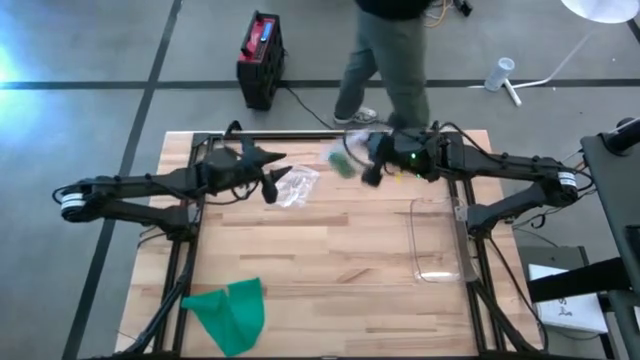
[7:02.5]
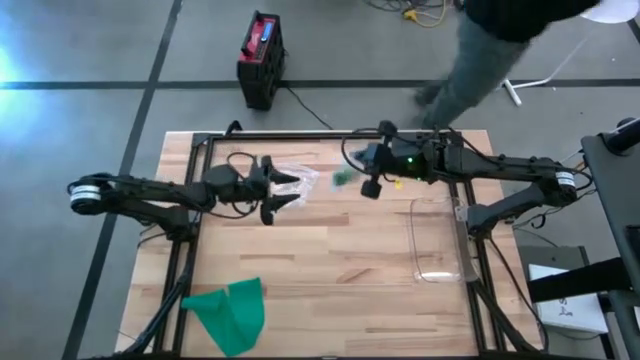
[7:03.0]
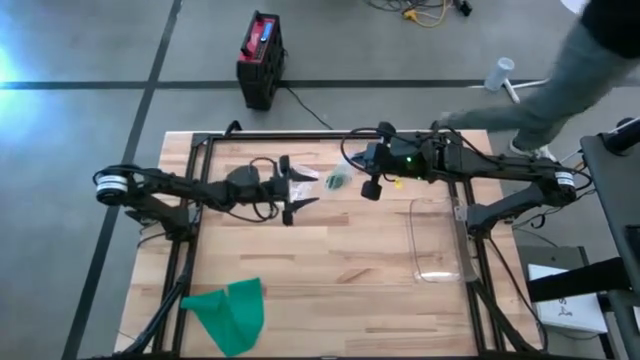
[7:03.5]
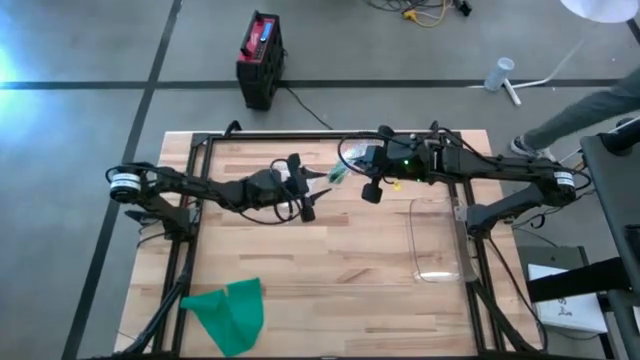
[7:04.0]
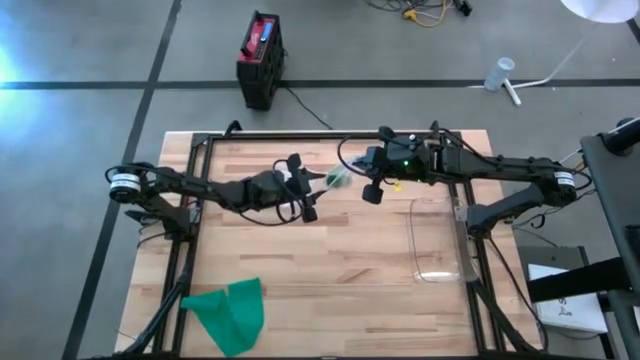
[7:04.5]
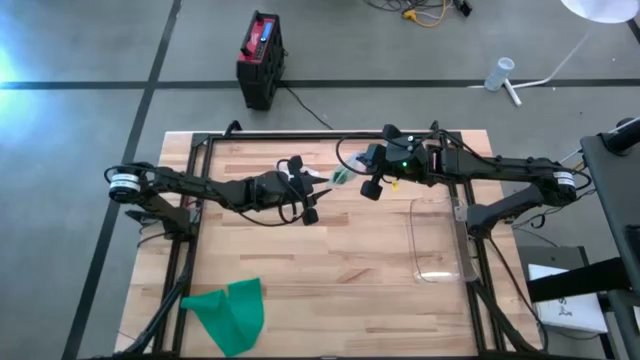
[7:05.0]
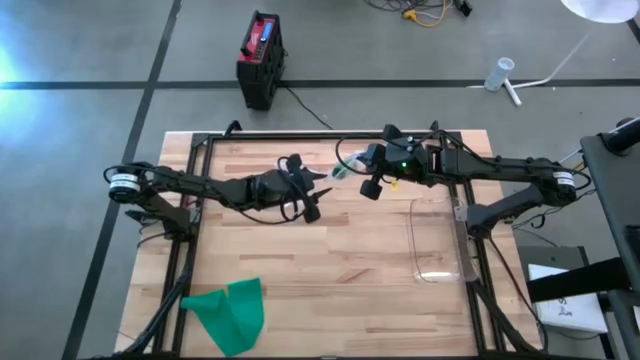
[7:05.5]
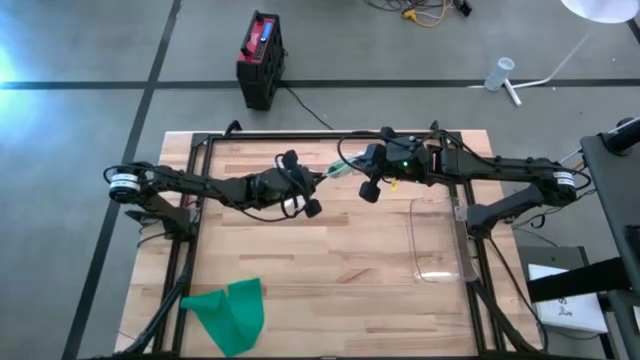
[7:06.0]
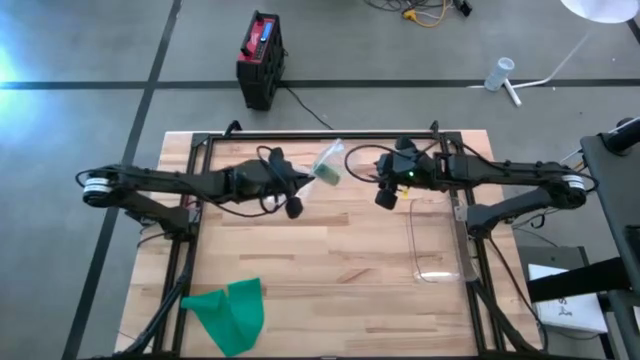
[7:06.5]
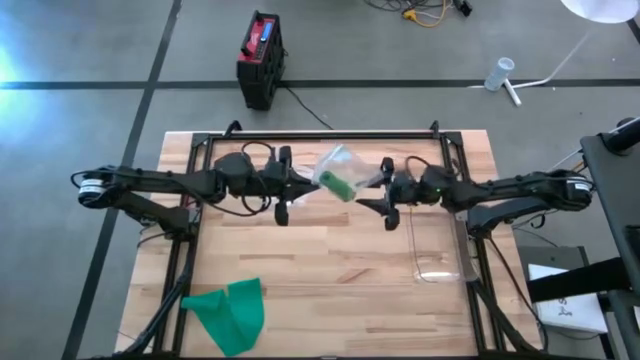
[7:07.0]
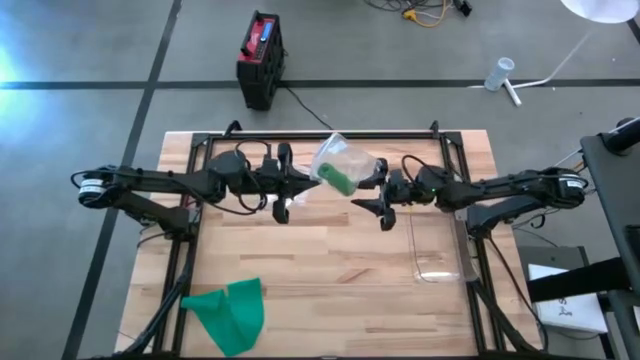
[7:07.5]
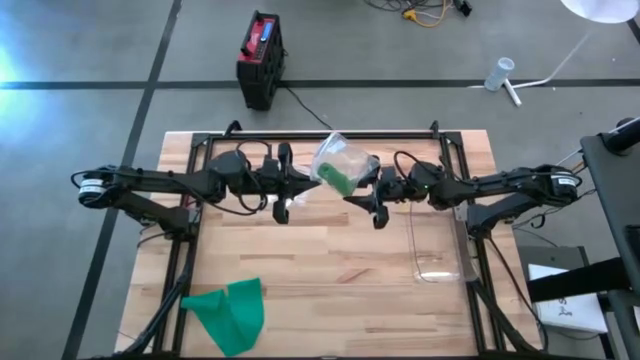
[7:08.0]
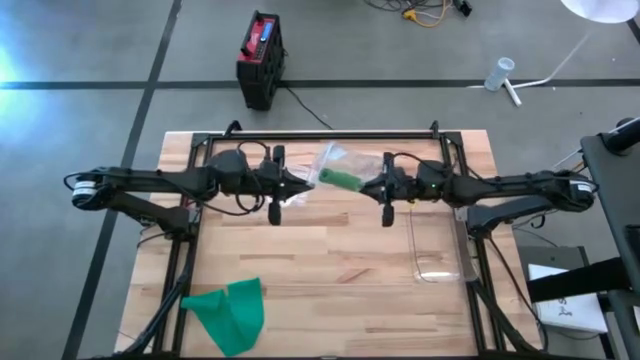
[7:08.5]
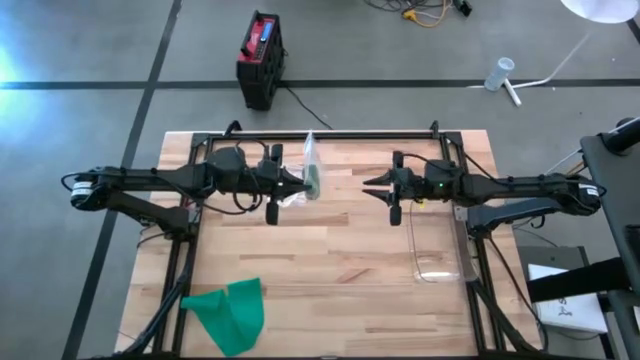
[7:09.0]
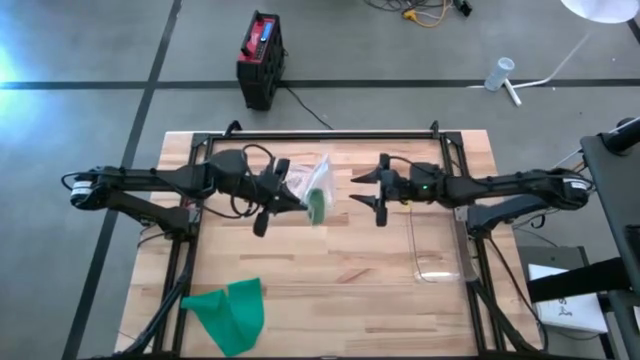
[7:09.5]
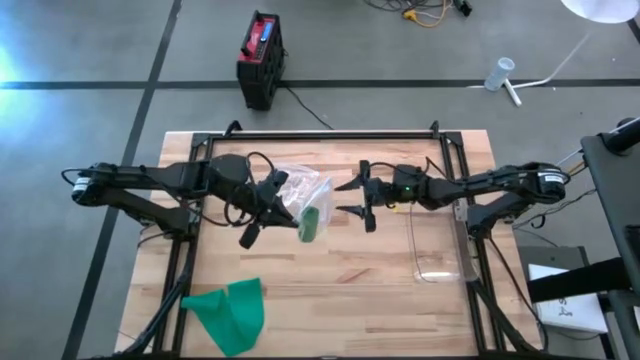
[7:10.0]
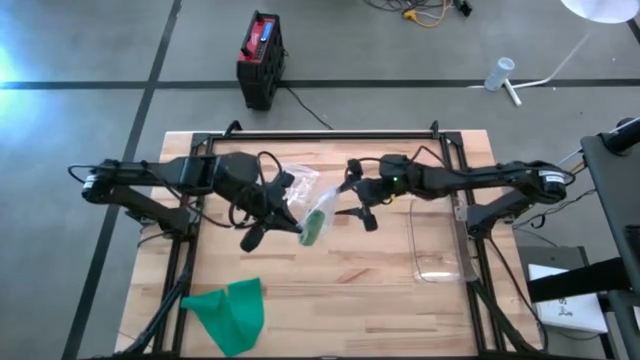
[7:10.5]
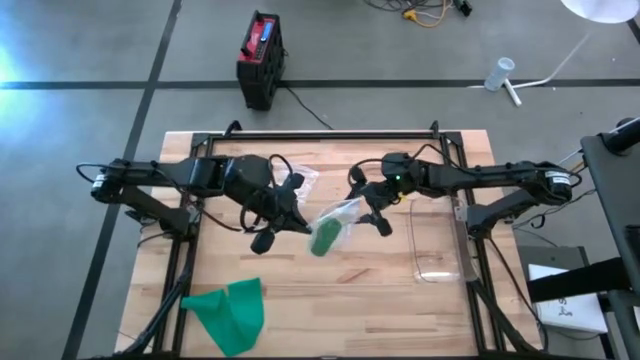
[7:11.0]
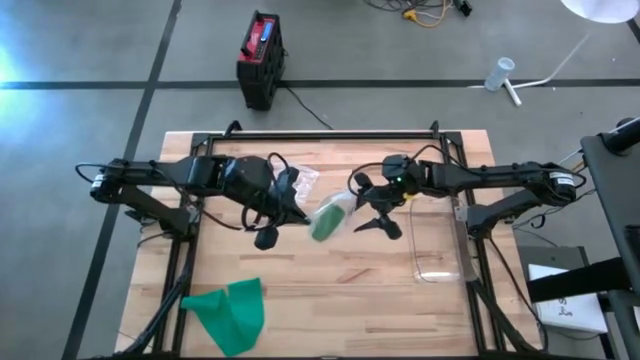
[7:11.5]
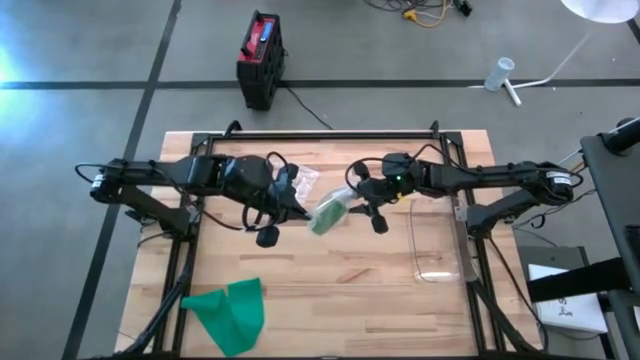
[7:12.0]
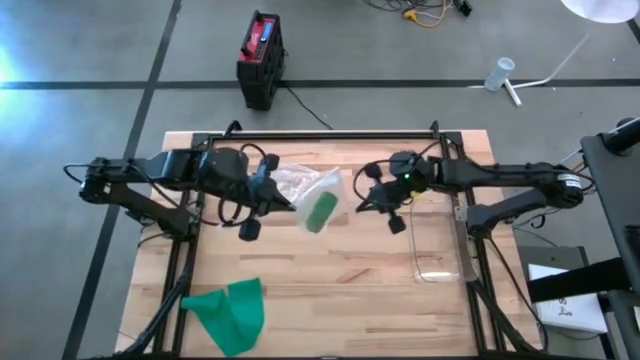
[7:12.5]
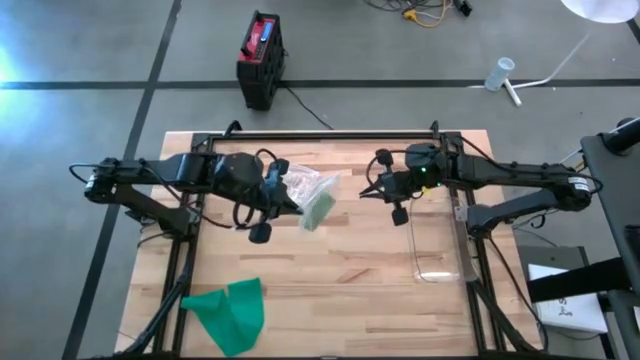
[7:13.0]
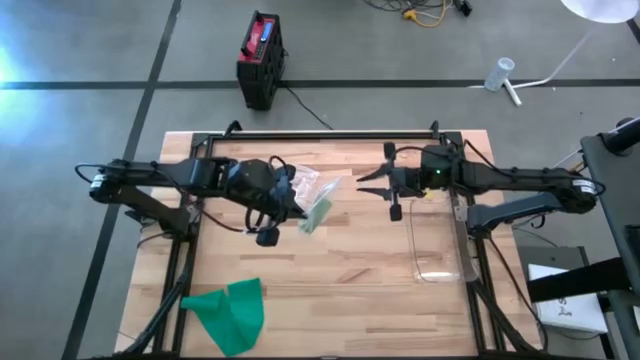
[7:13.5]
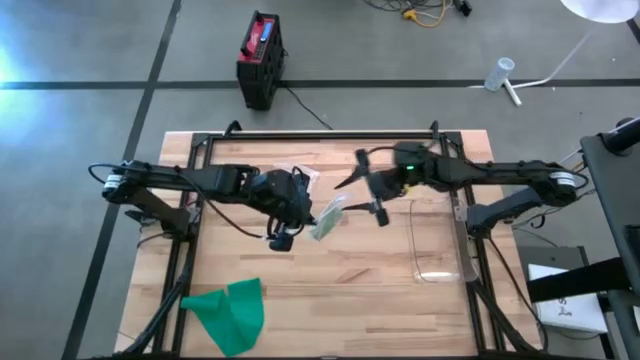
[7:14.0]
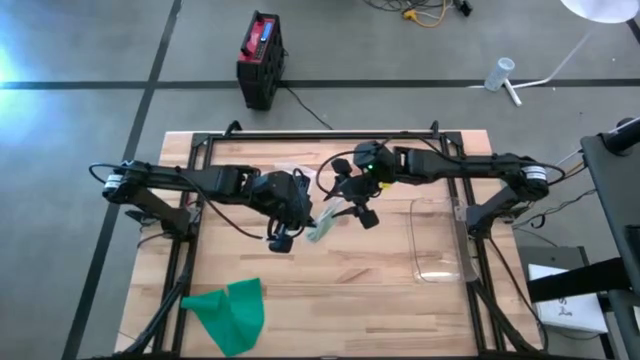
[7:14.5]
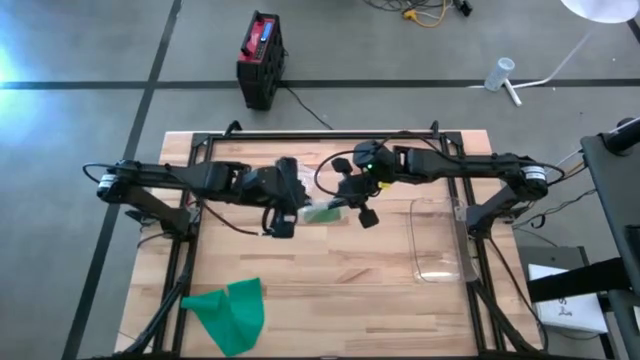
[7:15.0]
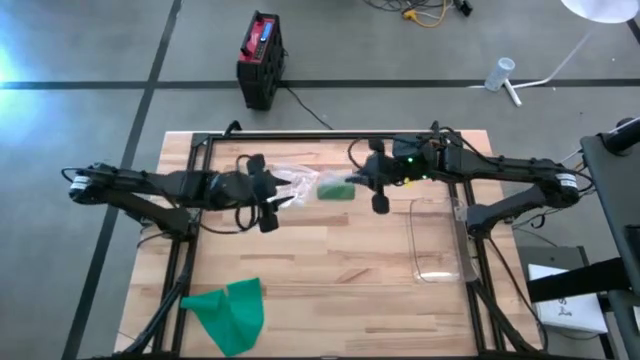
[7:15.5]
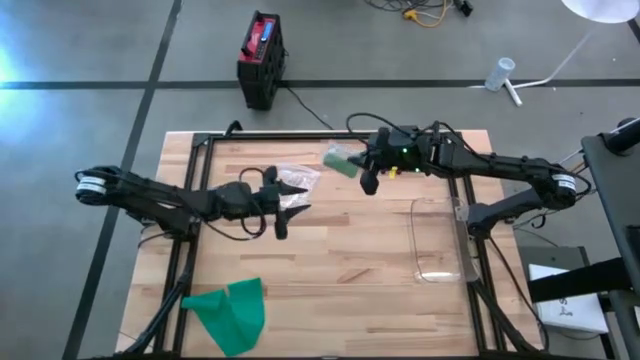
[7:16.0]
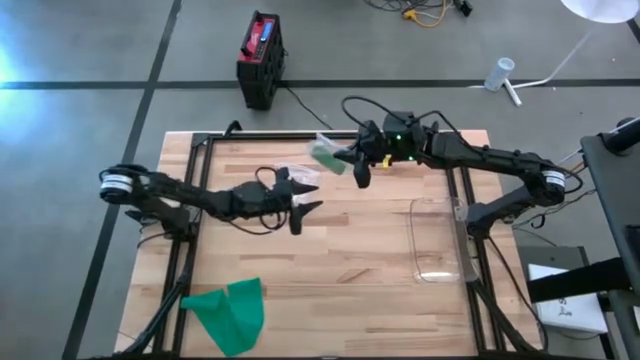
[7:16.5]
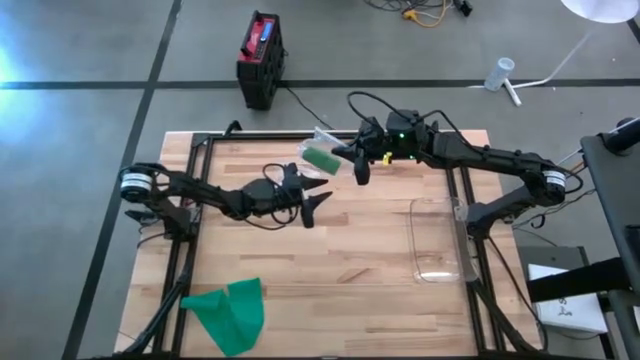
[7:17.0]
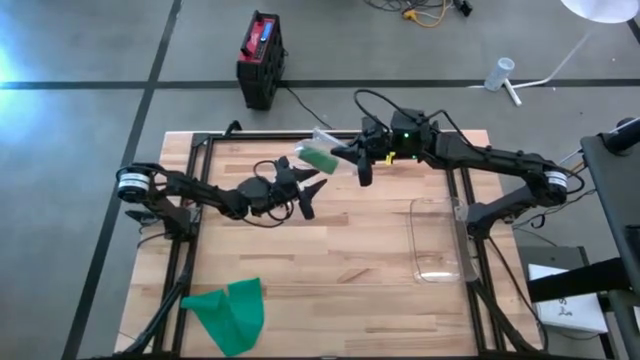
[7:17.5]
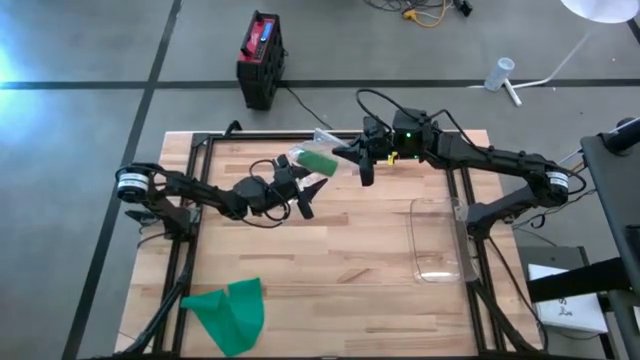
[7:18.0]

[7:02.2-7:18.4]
Task: Roll bandage
Put the transparent zip bag with the rolled green bandage into the transparent bin

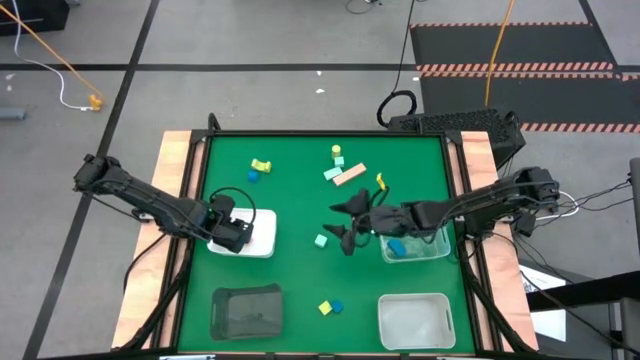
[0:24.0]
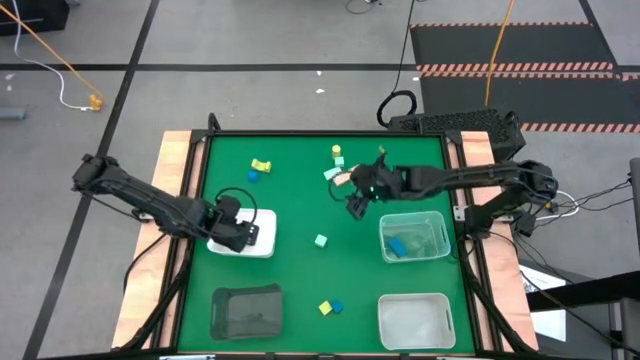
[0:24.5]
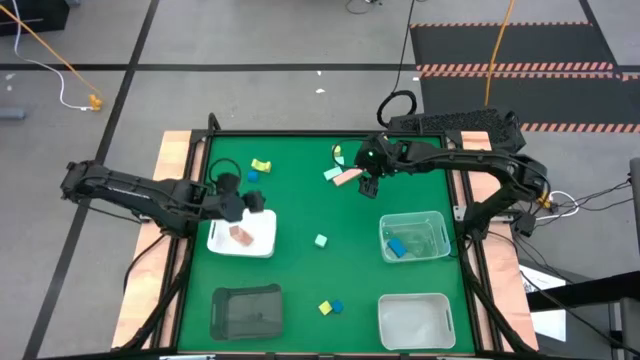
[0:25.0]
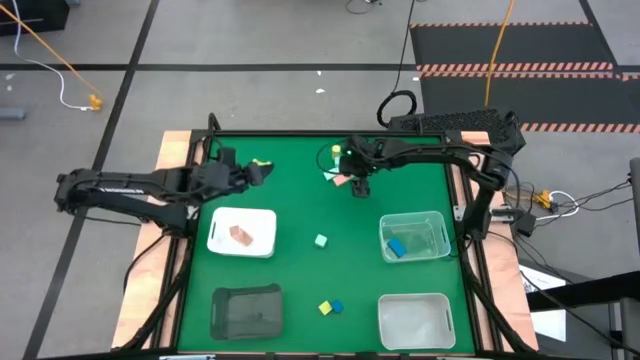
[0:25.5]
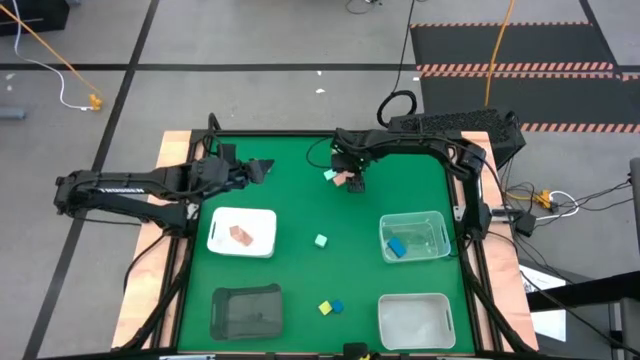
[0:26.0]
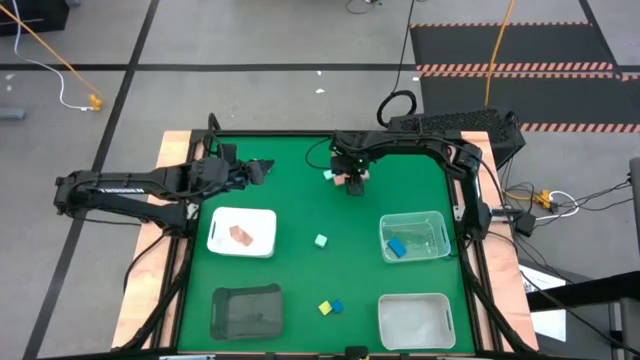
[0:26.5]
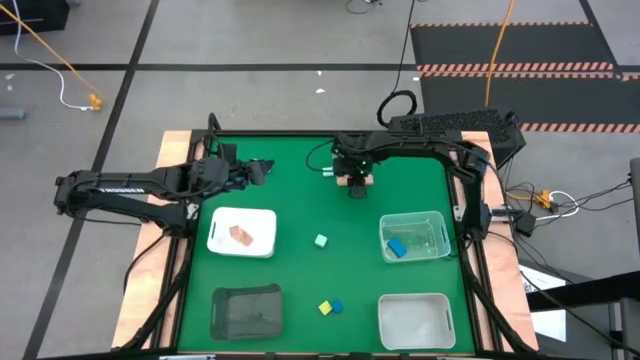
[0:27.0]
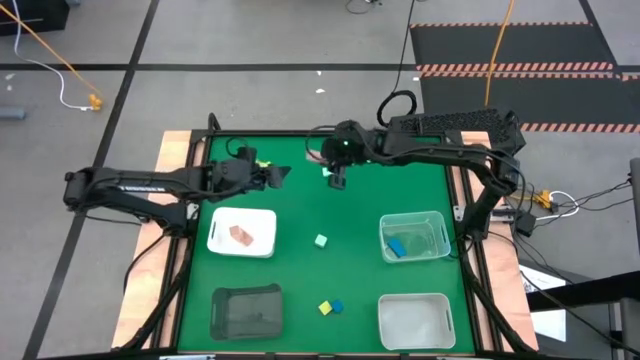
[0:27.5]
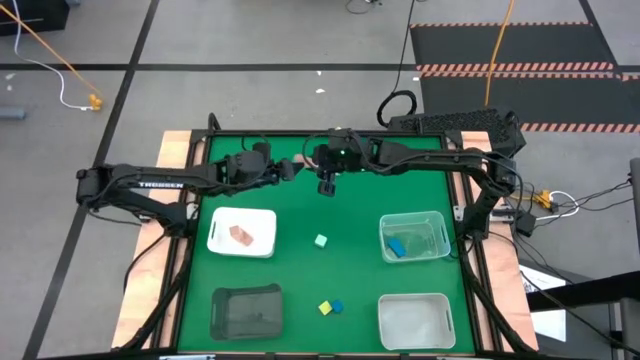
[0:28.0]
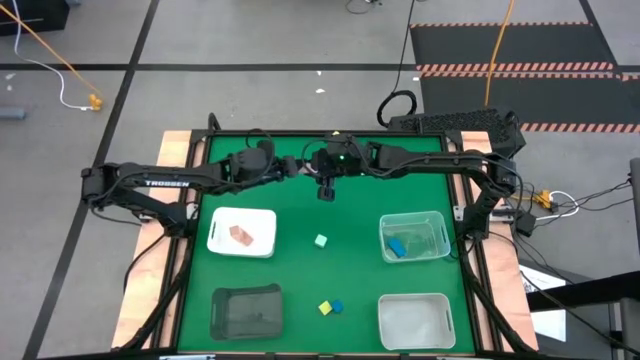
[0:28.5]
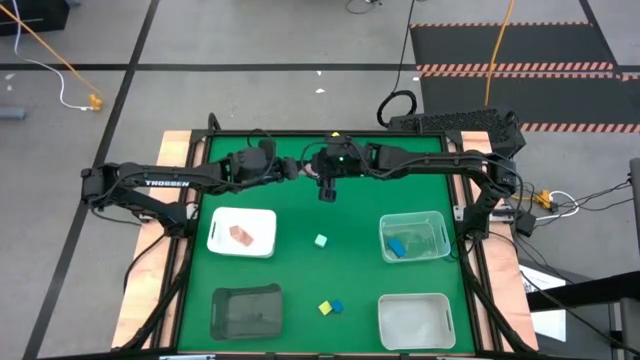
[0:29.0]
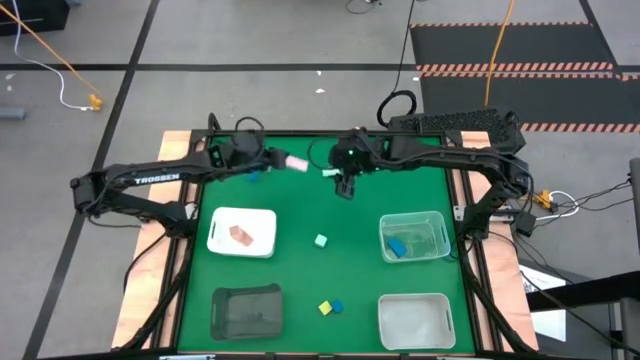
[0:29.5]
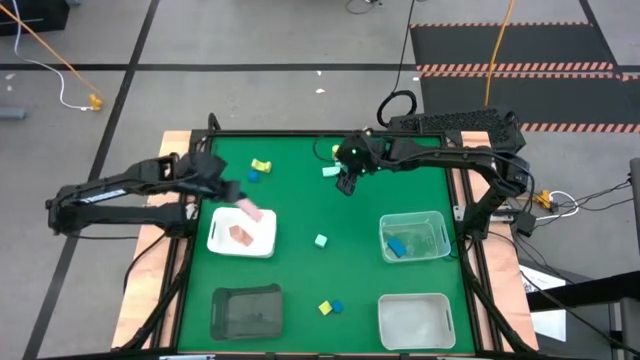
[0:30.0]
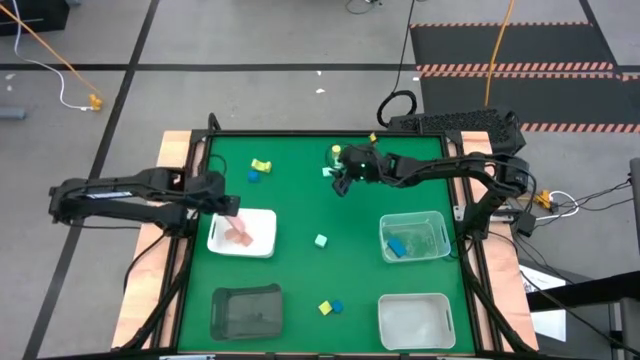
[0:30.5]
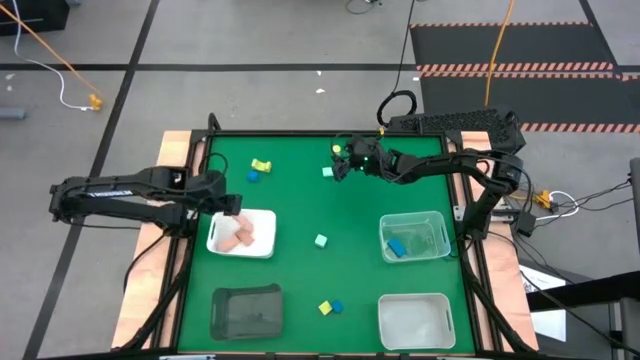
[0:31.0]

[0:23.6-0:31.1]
Task: Sort & place blocks by color
Put the light brown block into the white bin
